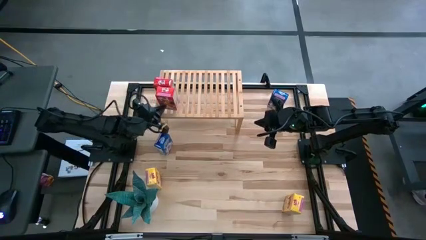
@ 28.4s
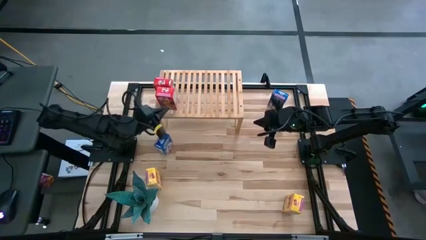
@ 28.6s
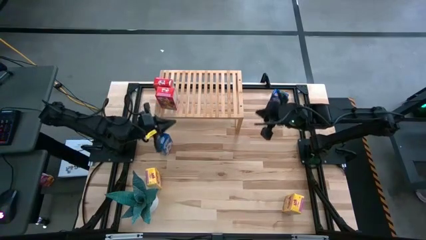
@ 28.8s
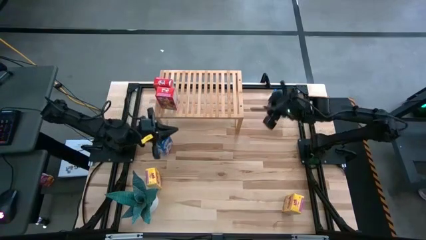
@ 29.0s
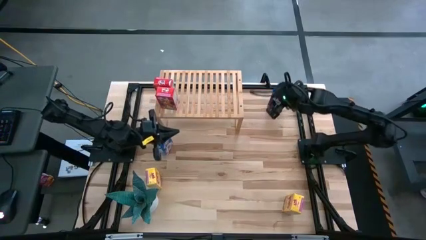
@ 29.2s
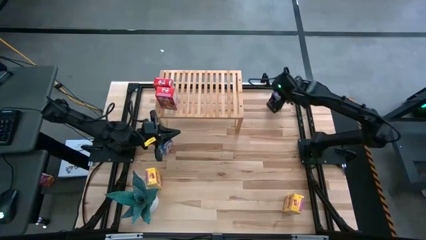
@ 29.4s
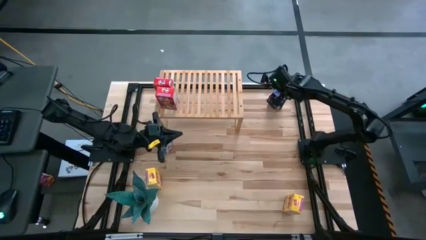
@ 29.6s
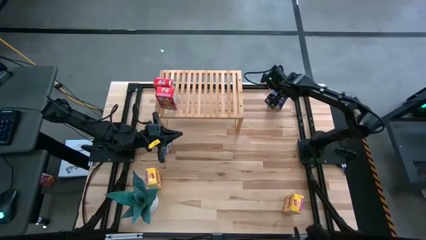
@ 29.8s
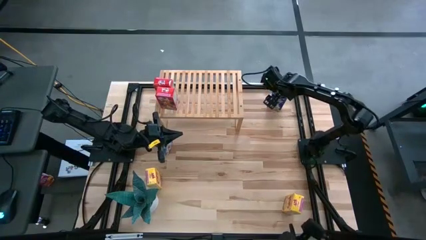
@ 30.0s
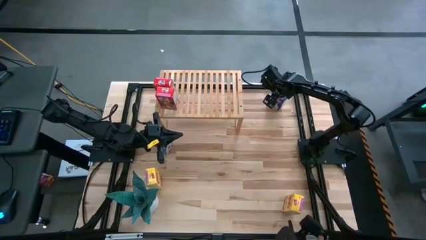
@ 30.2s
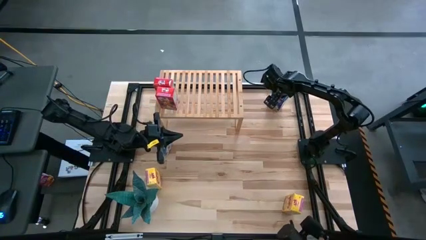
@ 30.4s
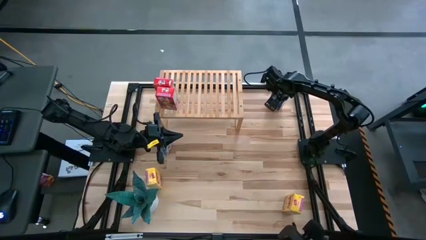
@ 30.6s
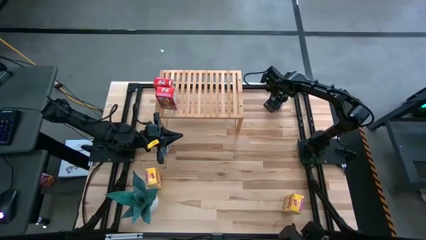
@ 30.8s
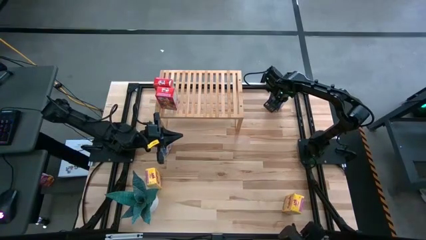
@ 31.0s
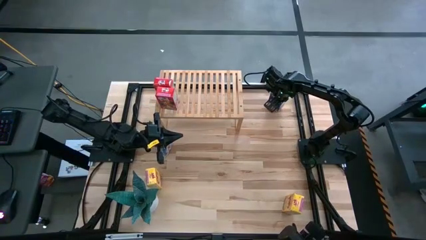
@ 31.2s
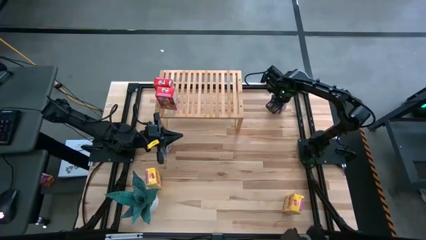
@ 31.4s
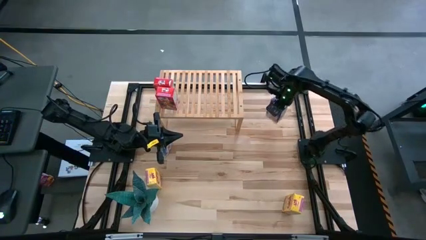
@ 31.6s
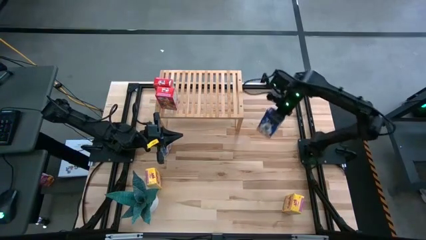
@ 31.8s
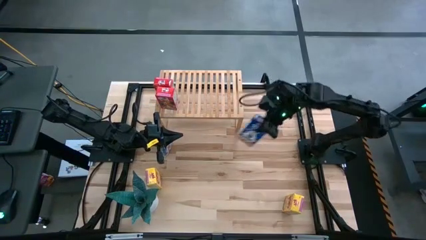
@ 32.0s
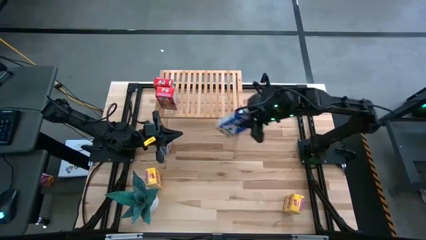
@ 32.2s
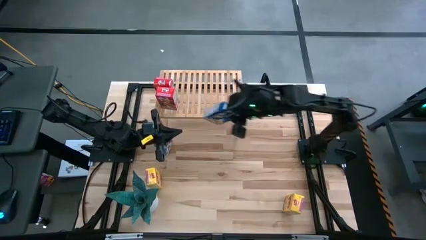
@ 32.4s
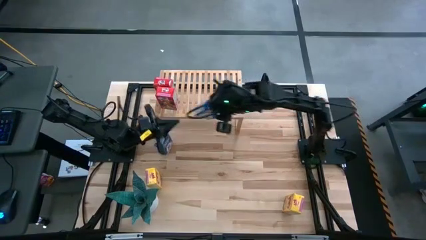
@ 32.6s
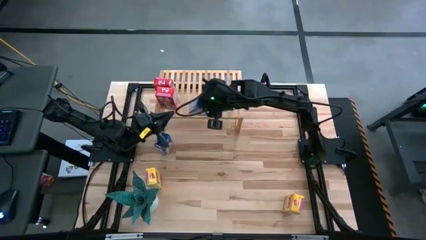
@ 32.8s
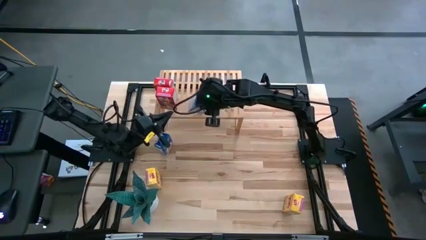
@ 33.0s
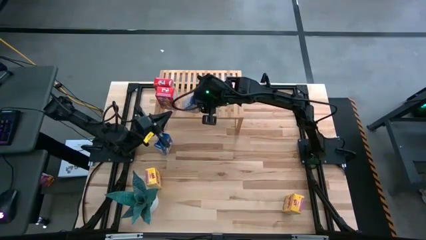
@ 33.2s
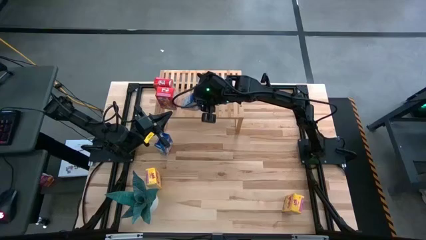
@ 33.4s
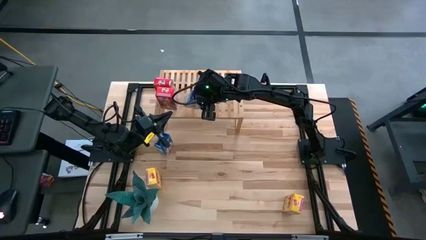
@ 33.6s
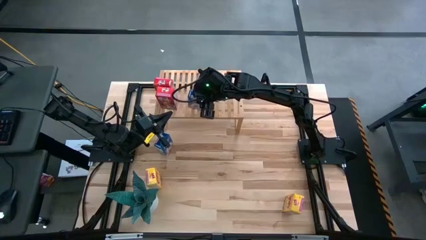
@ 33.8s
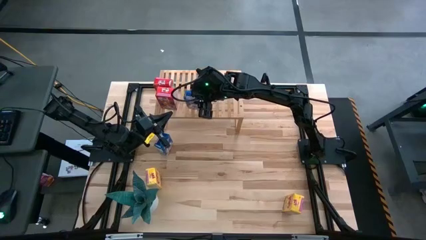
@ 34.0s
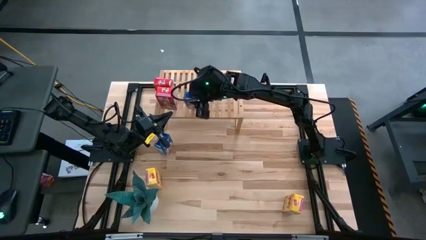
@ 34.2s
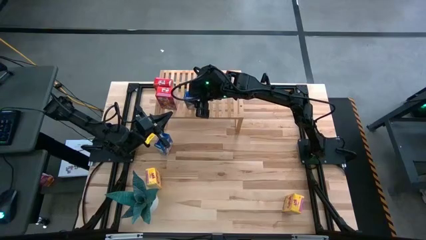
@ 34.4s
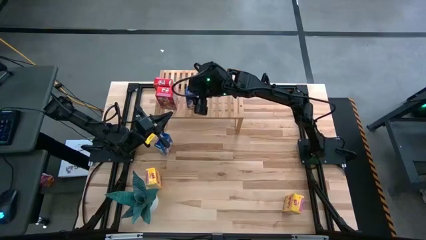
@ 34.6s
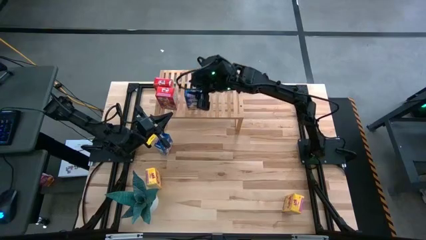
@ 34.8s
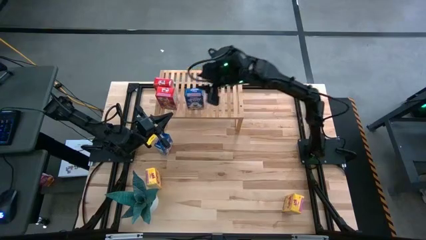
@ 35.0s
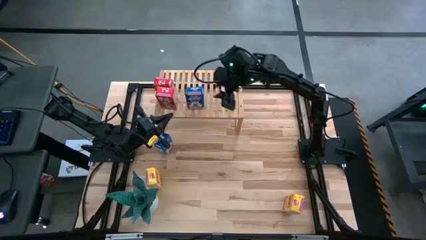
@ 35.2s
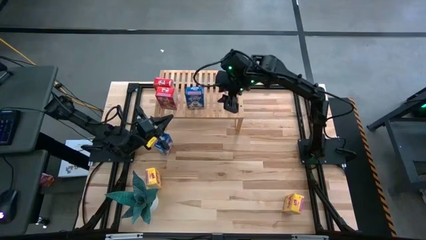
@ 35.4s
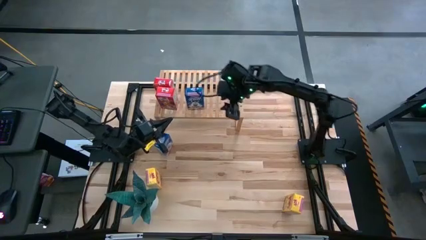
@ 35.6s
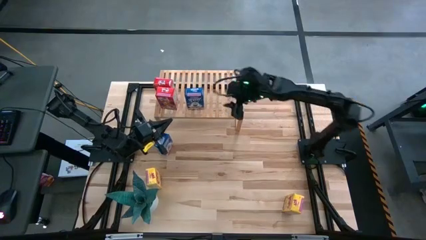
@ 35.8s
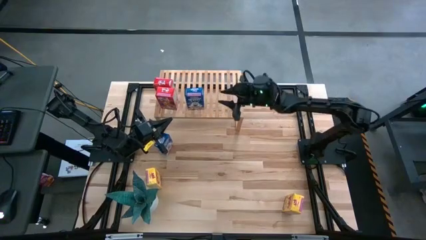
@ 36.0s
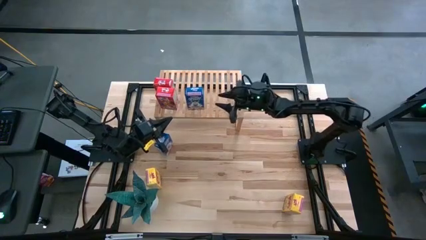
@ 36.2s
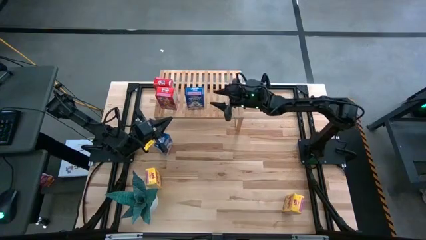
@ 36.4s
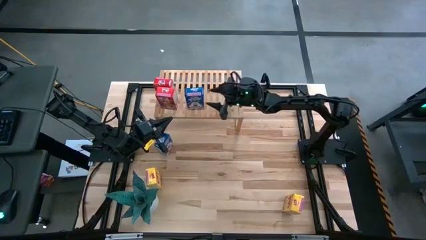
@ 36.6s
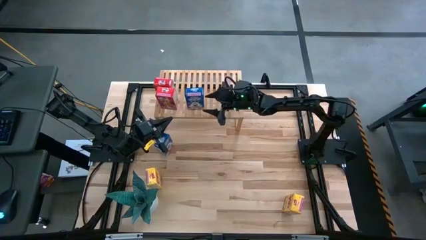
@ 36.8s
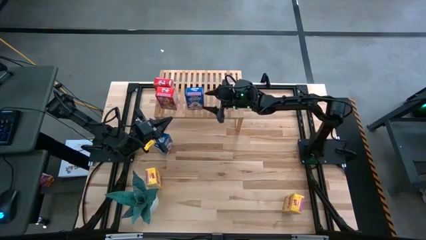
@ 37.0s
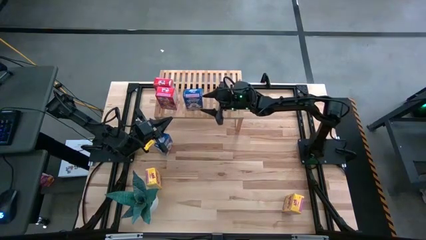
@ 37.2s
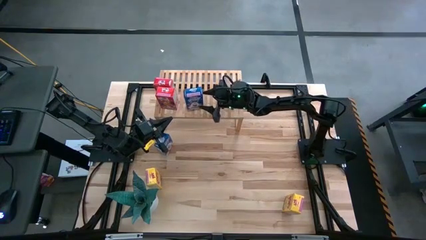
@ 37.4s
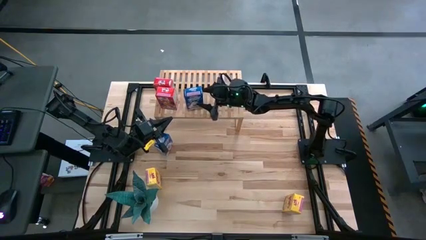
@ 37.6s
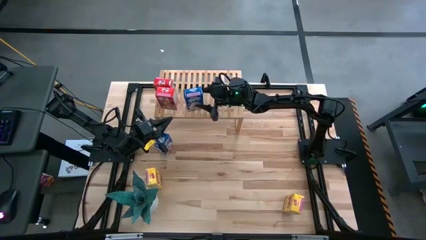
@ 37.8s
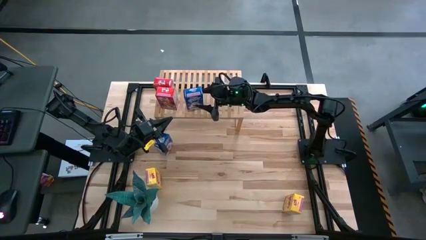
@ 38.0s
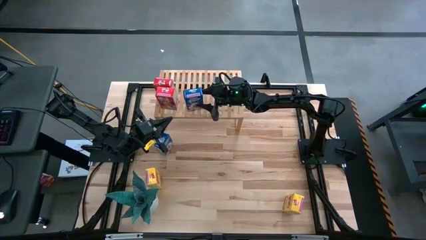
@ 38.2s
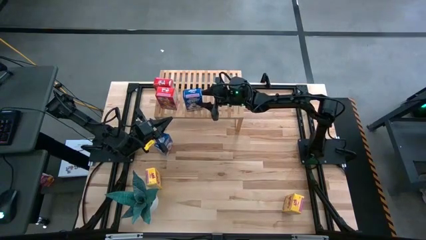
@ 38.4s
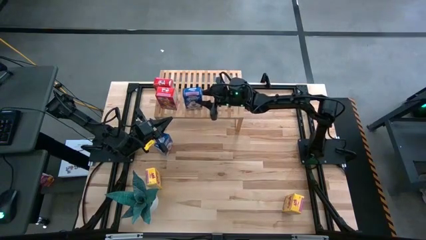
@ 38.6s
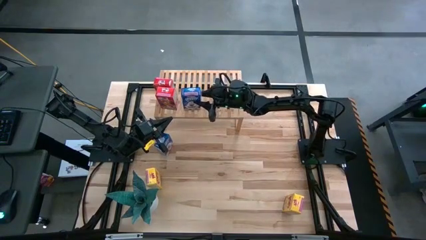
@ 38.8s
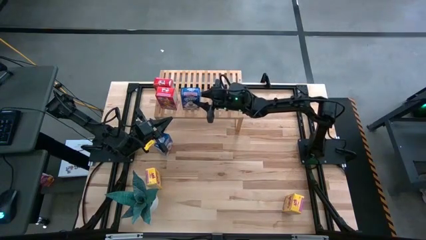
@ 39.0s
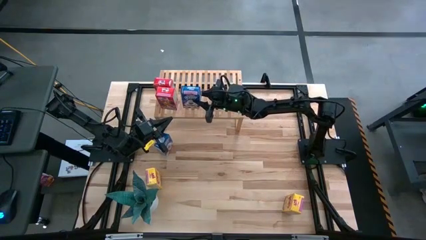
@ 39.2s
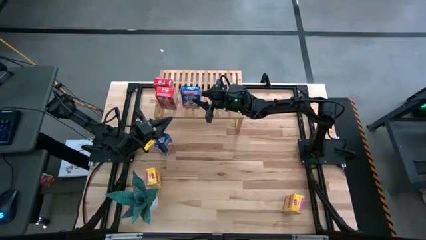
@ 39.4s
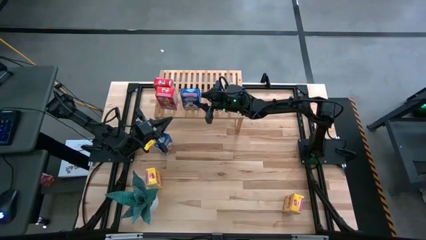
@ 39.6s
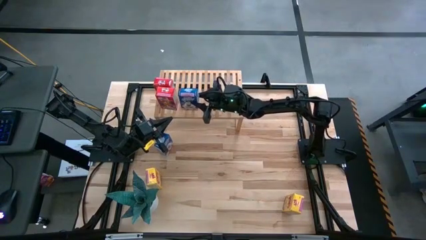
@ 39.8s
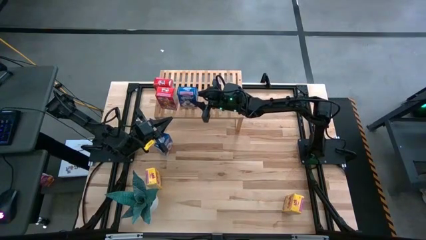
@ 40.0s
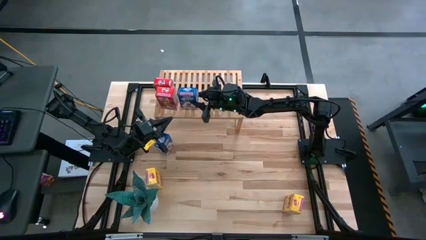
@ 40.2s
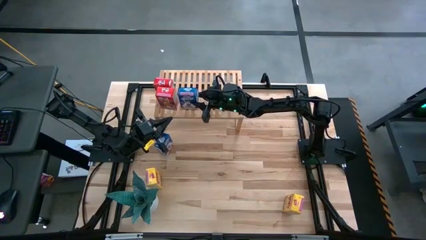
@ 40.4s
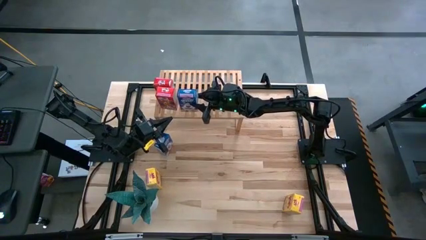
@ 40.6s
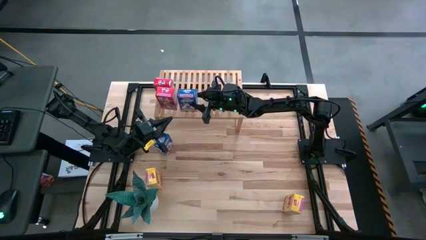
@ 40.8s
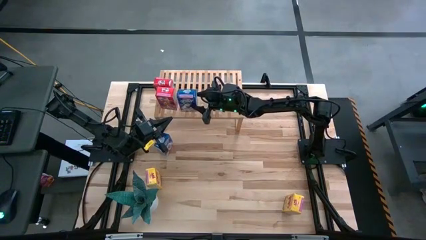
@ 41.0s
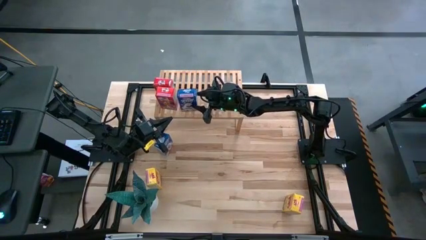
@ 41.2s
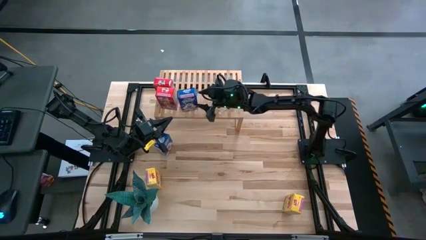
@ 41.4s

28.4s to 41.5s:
Task: Stack cereal on shelf
Put the right blue cereal box on the shelf
